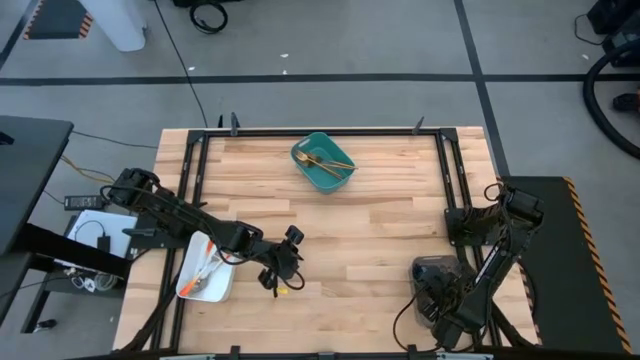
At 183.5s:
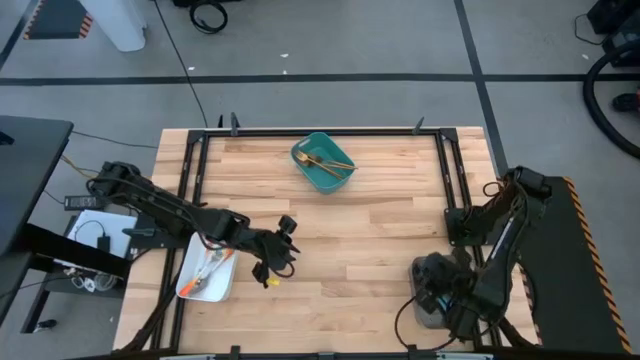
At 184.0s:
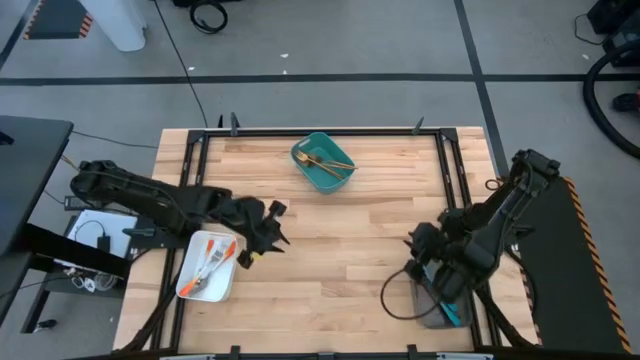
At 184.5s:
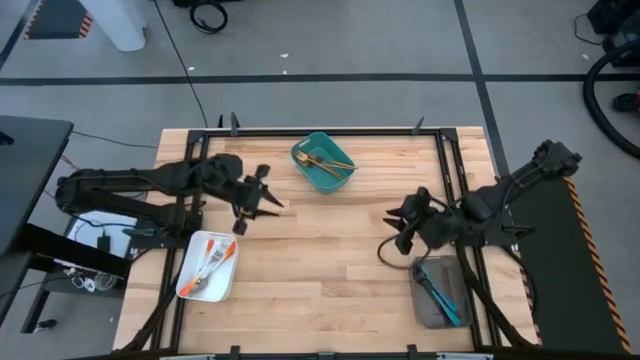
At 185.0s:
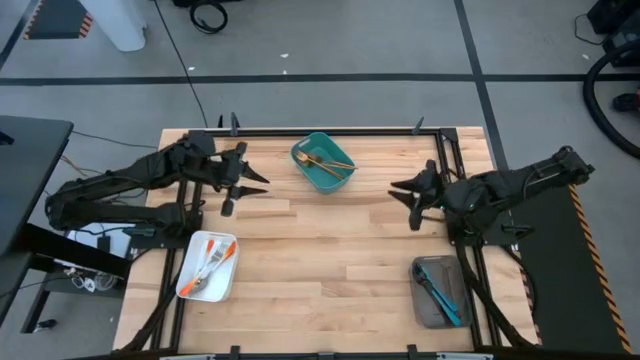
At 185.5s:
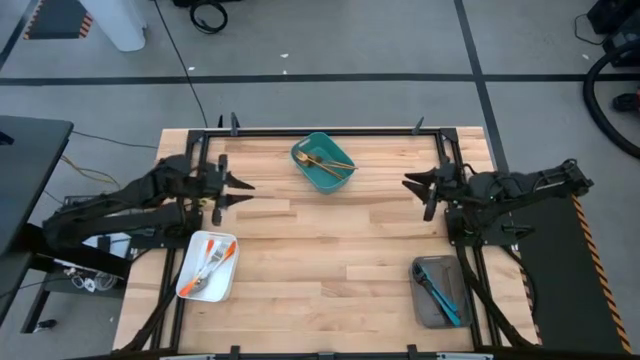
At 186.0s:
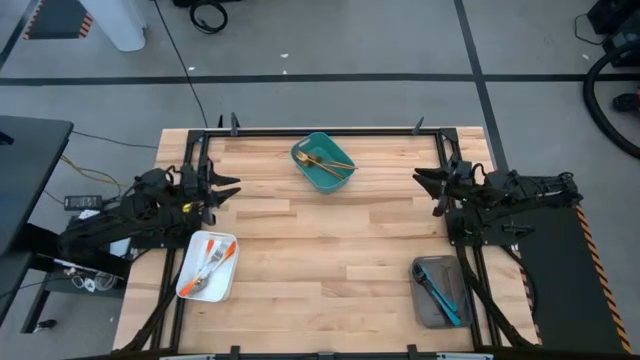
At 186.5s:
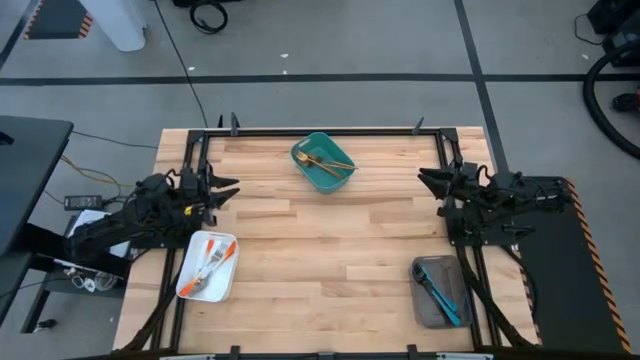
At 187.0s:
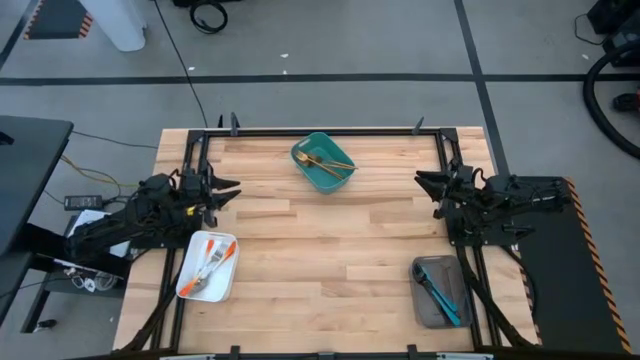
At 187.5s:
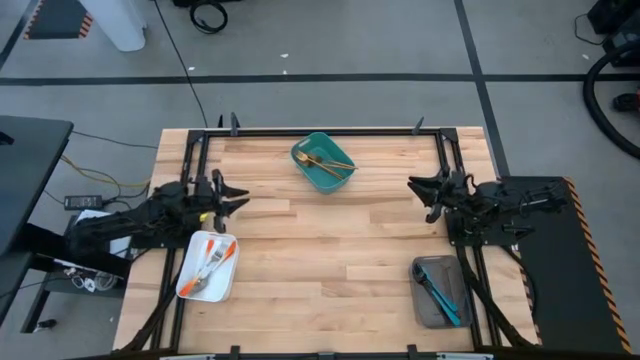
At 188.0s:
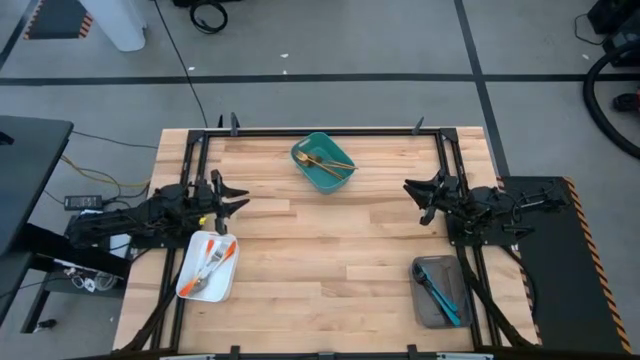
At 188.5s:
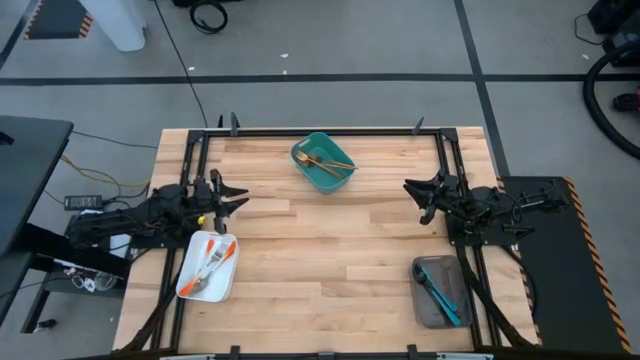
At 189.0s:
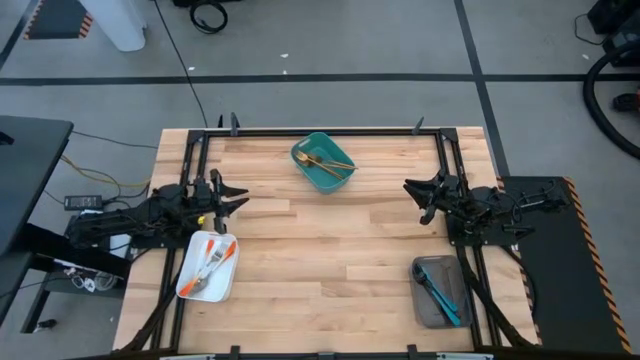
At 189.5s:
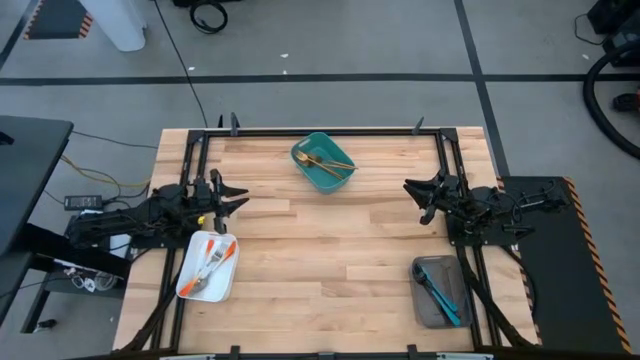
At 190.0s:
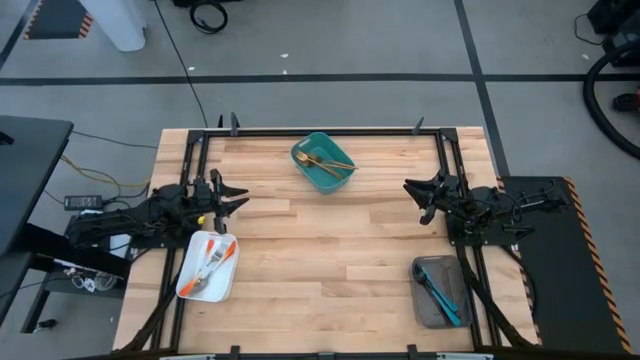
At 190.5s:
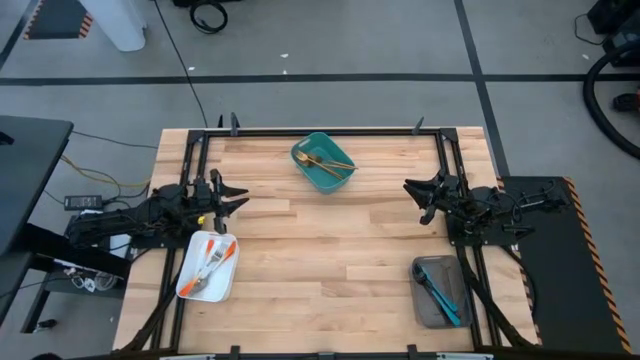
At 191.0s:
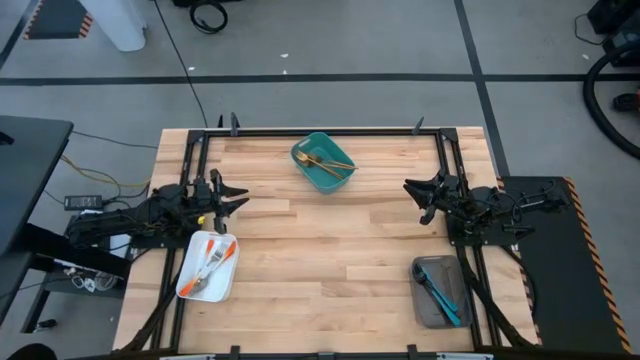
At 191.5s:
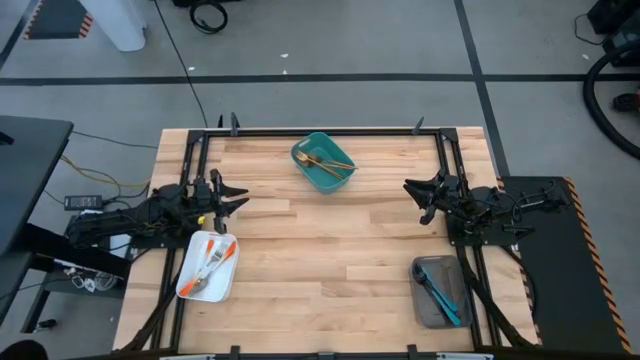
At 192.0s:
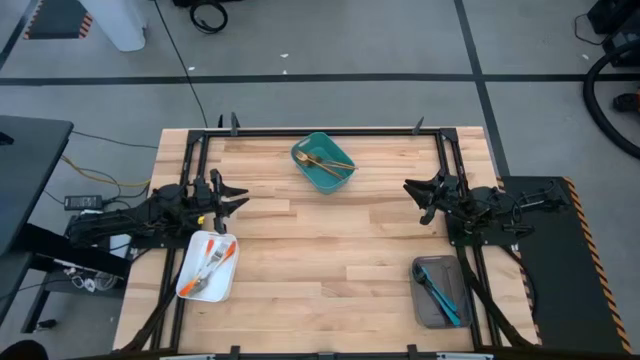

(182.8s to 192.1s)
Task: Sort silverware by color (type)
Return to Home Position

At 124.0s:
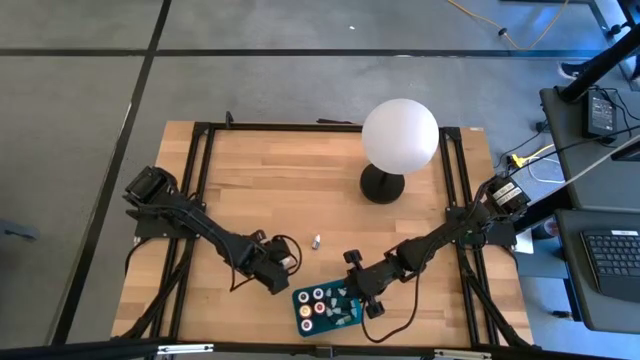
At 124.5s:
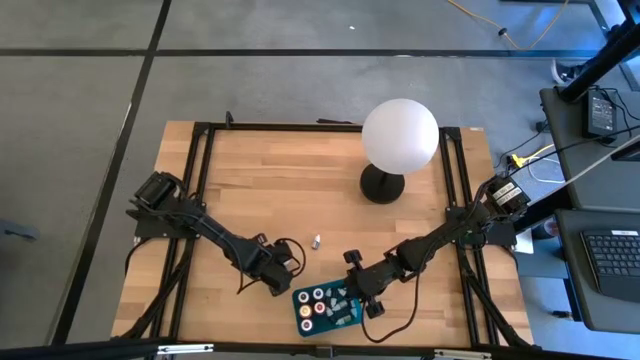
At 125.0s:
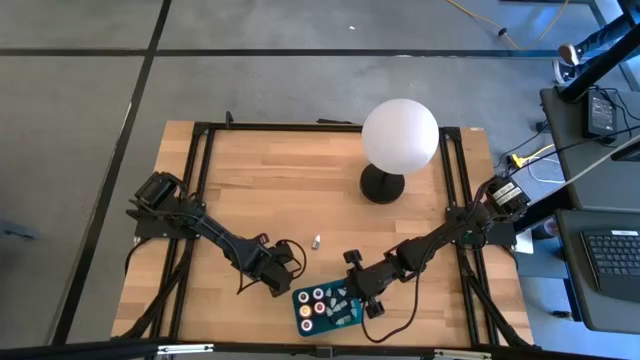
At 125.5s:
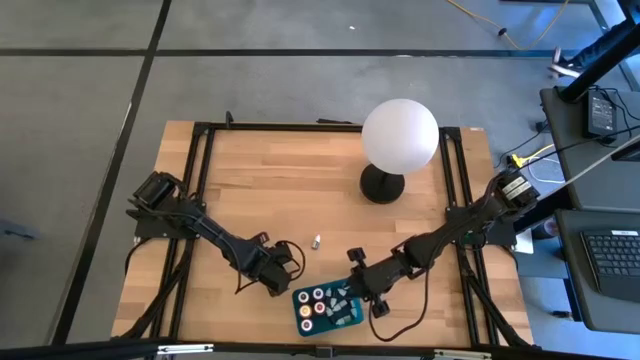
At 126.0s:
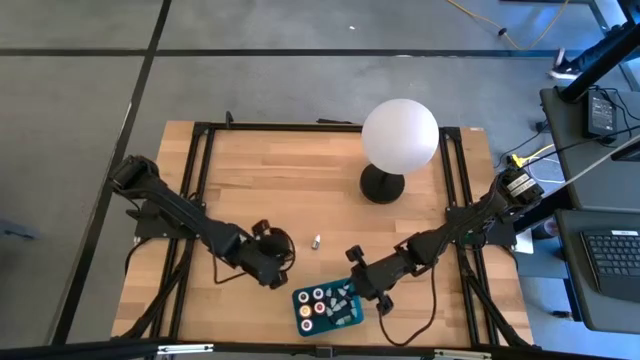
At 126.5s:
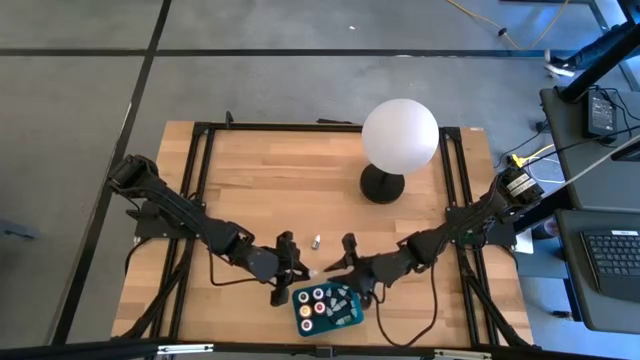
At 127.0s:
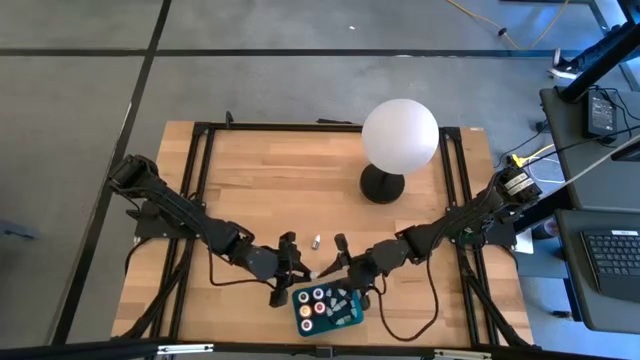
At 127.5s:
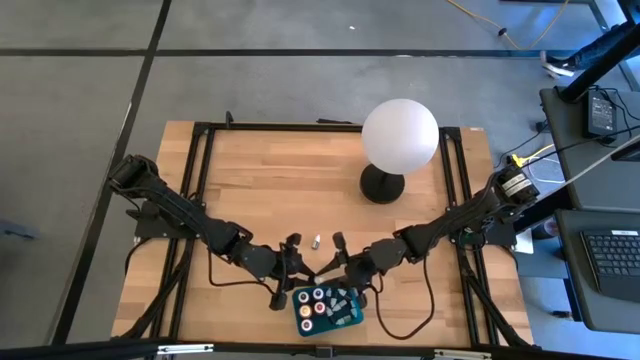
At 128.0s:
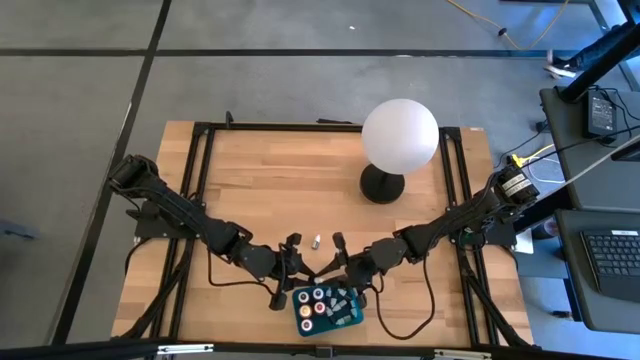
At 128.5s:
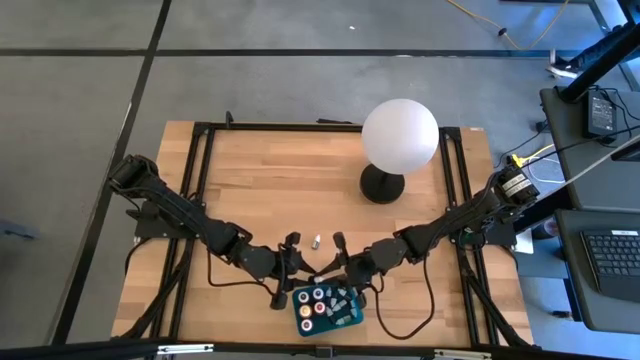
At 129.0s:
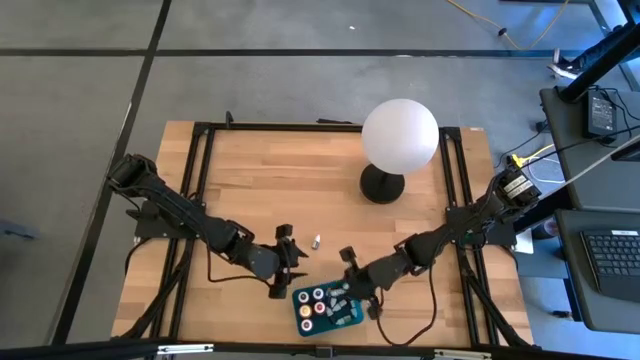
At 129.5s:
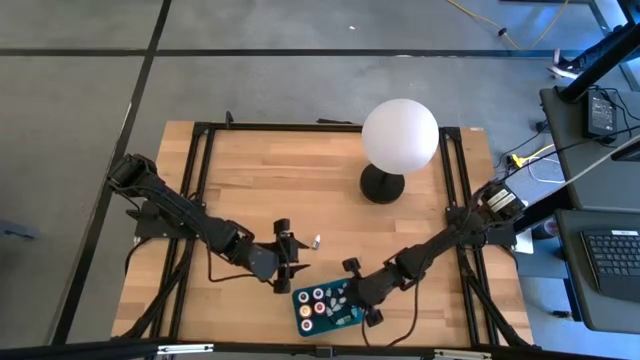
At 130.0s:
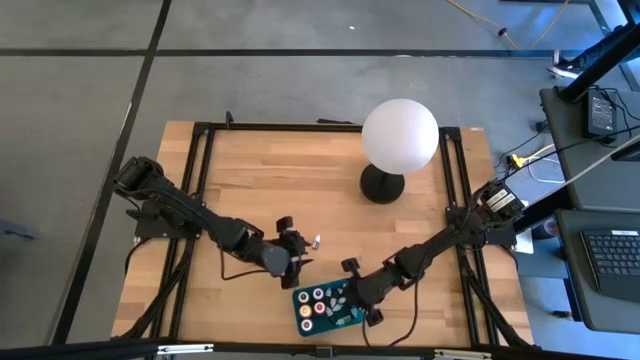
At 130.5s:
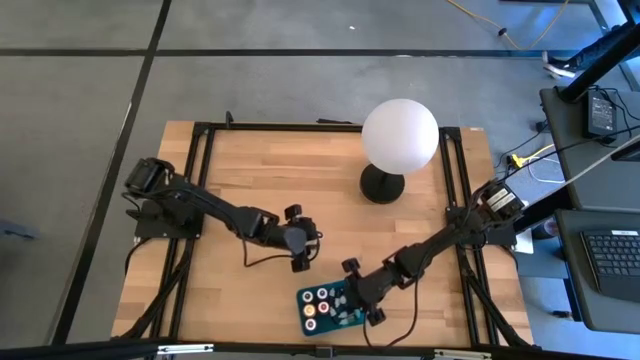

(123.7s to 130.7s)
Task: Pick & Place food coloring
Put the small light blue food coloring bottle into the blue bin

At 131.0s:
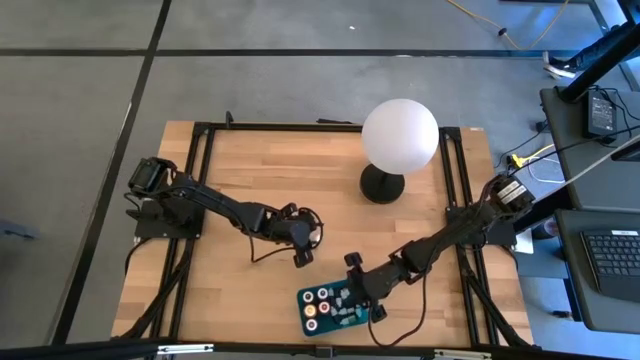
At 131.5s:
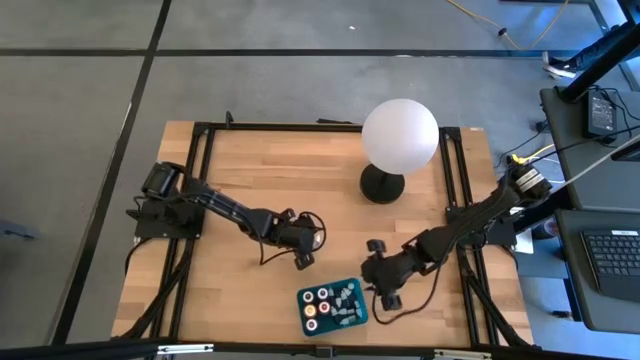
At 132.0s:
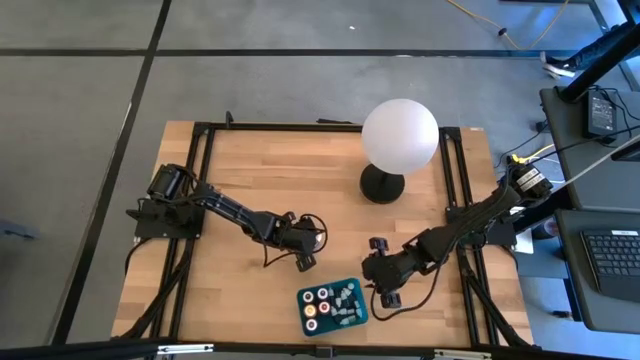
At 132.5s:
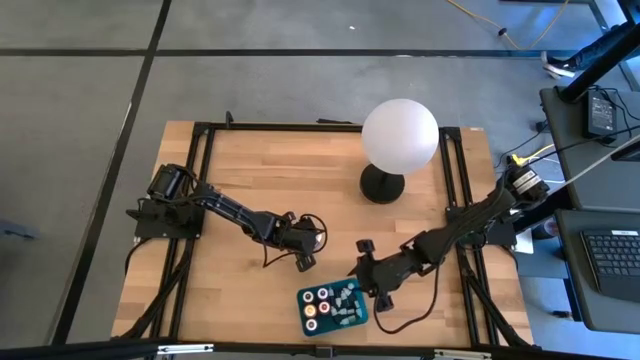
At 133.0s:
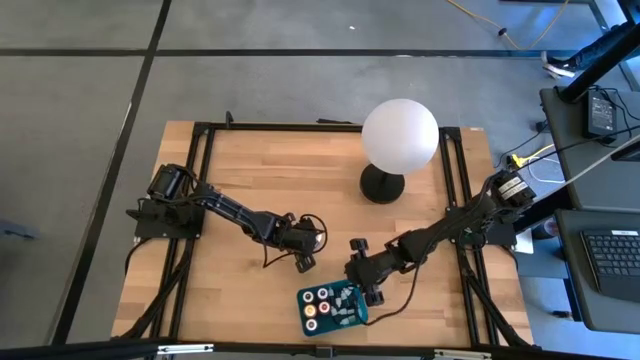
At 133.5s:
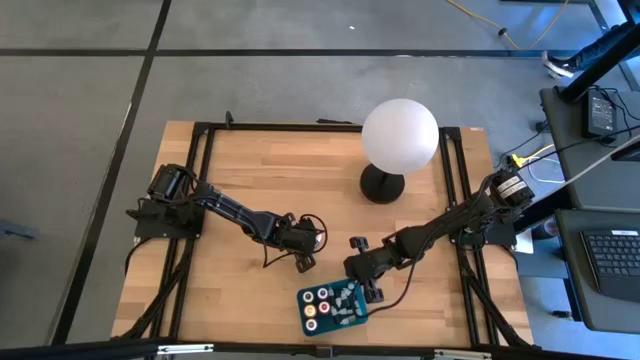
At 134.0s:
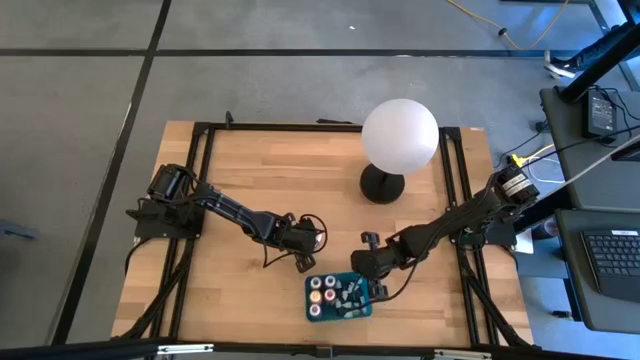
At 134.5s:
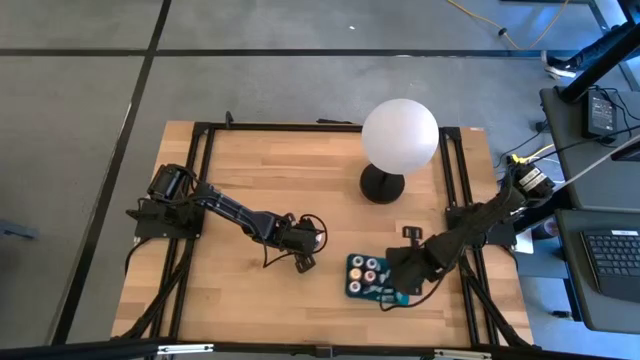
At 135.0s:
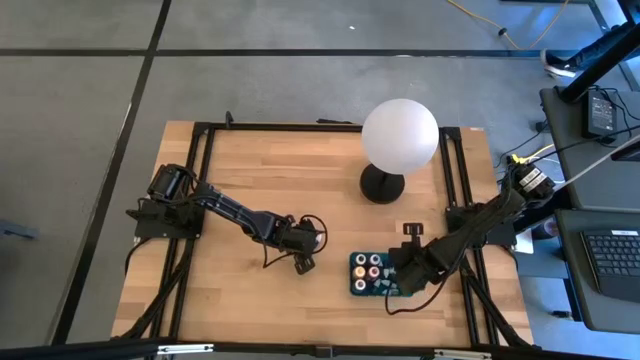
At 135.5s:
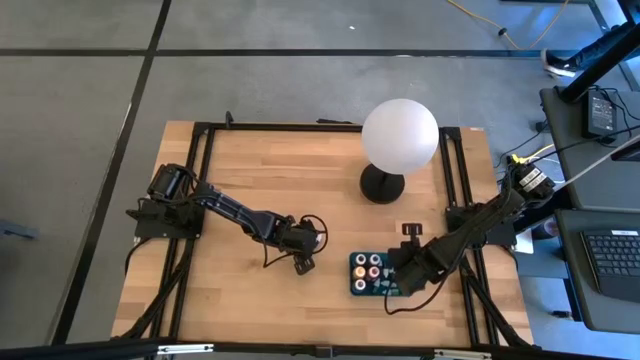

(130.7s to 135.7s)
Move the blue bin to the bottom left of the table
